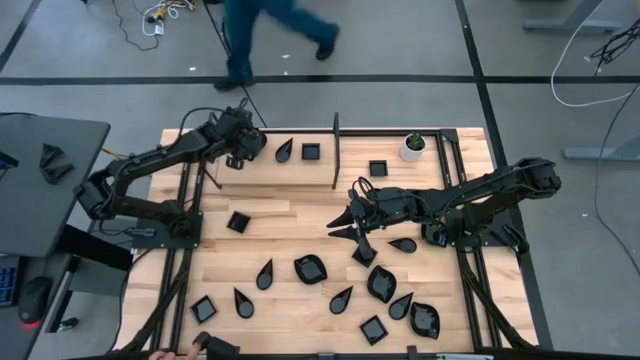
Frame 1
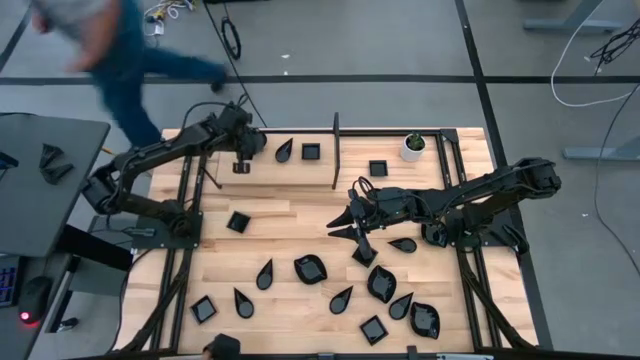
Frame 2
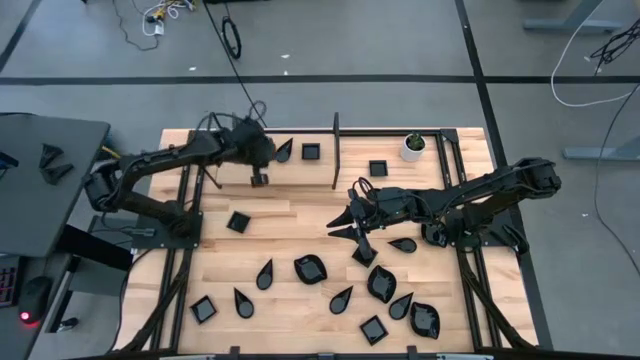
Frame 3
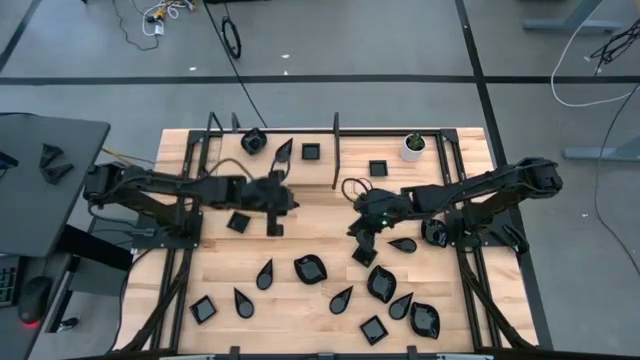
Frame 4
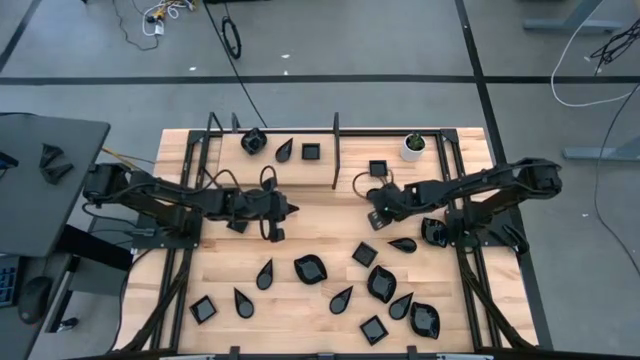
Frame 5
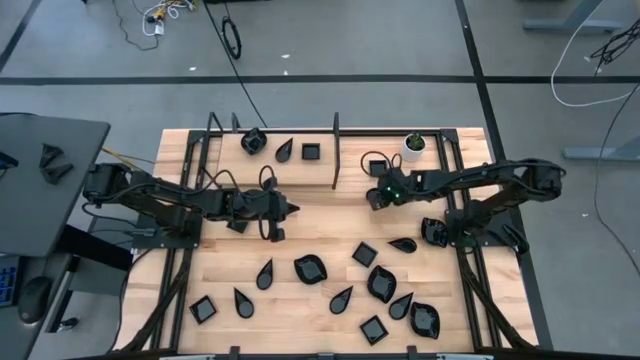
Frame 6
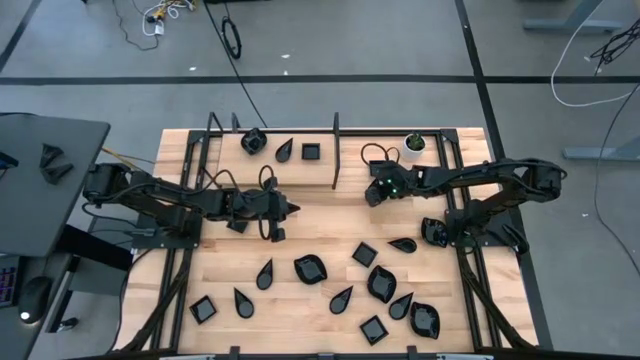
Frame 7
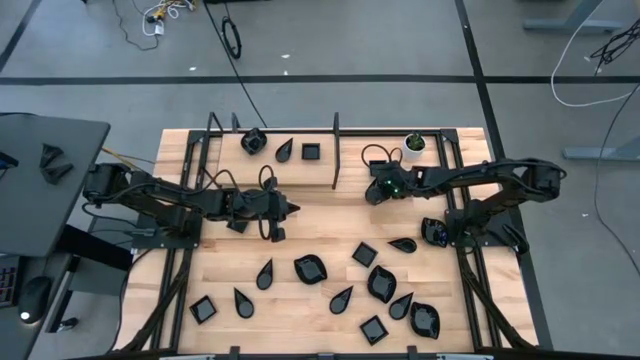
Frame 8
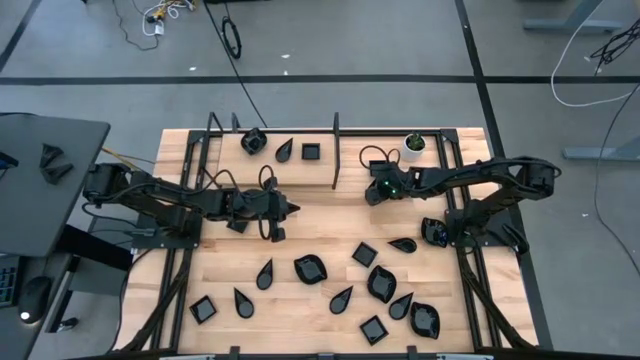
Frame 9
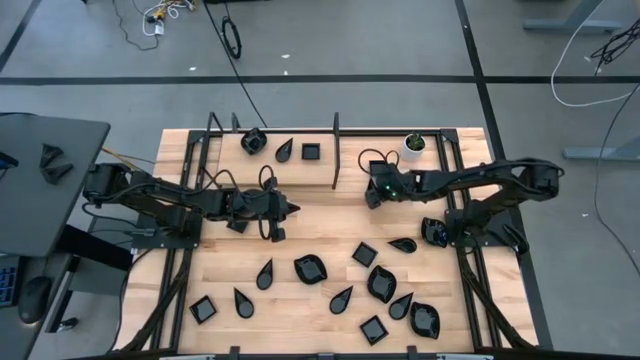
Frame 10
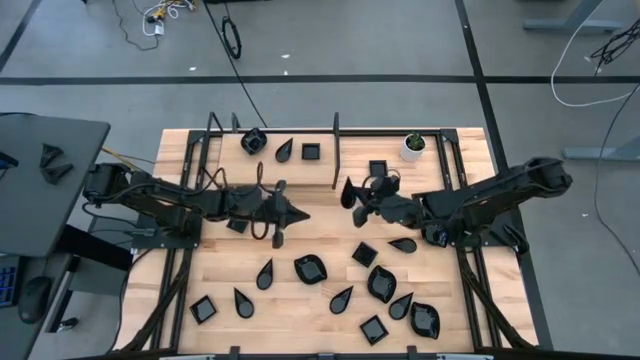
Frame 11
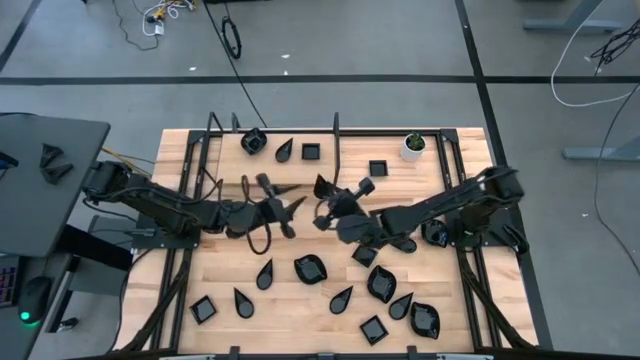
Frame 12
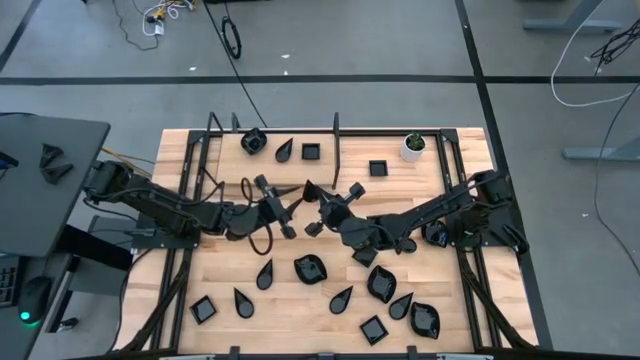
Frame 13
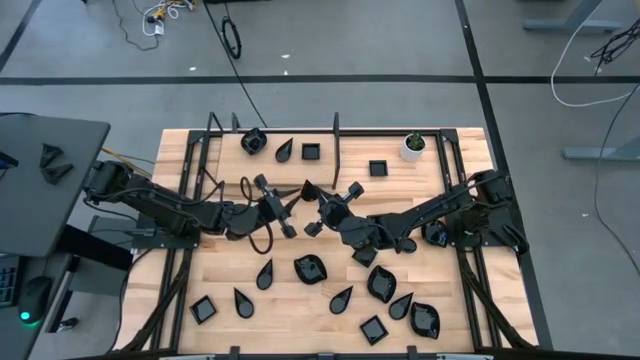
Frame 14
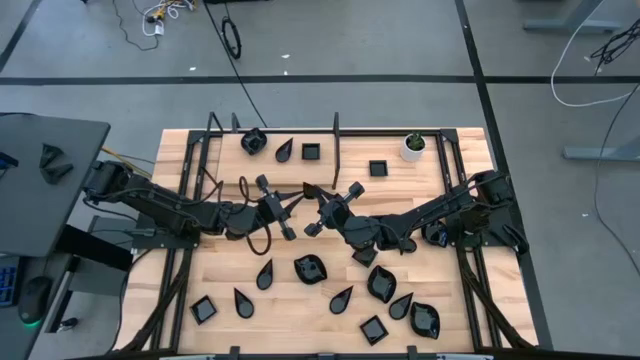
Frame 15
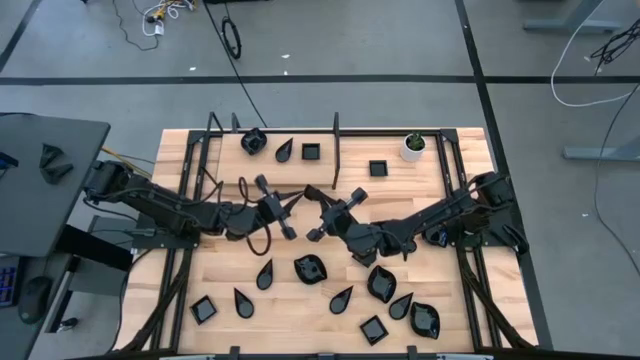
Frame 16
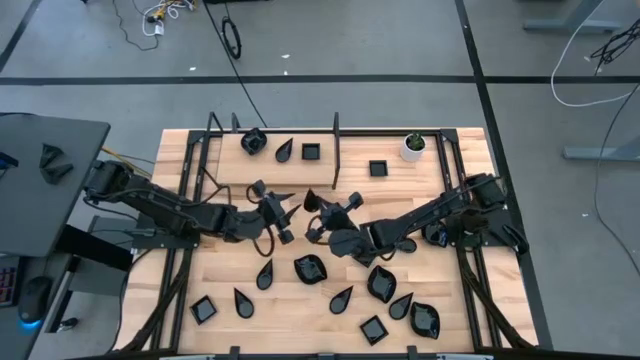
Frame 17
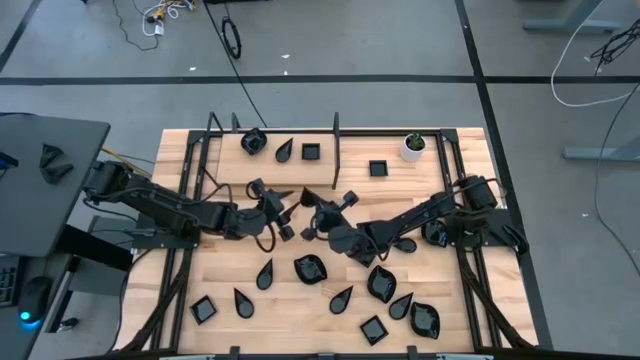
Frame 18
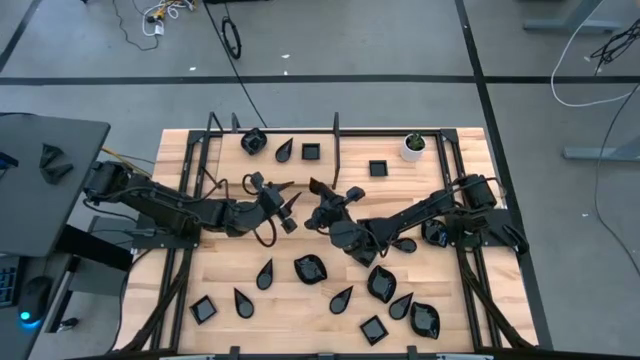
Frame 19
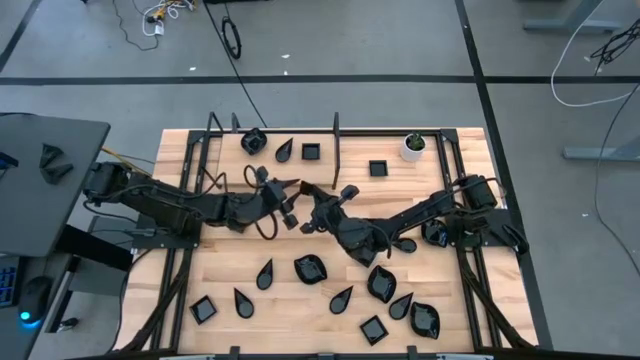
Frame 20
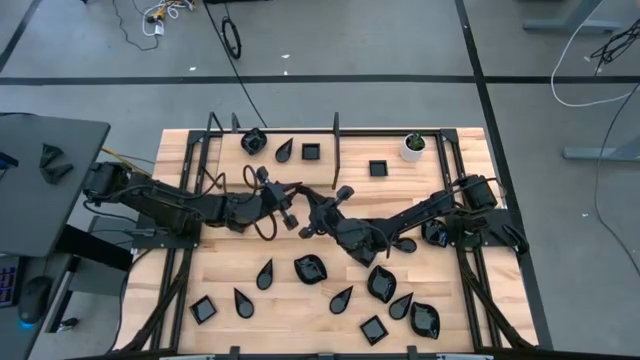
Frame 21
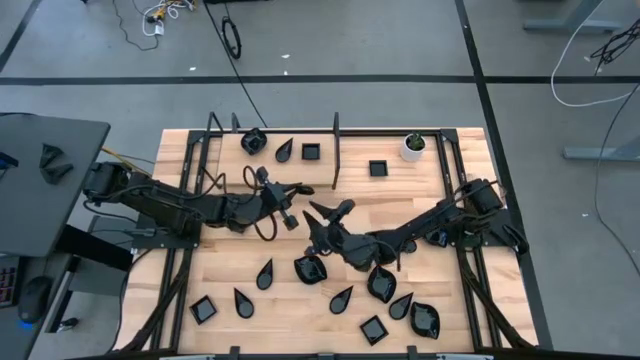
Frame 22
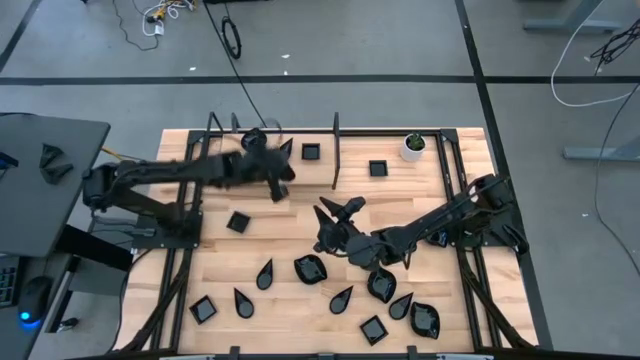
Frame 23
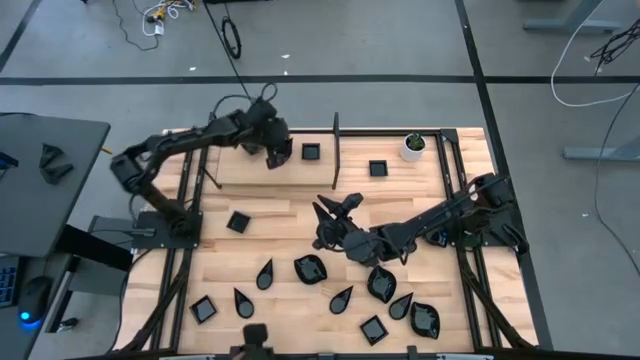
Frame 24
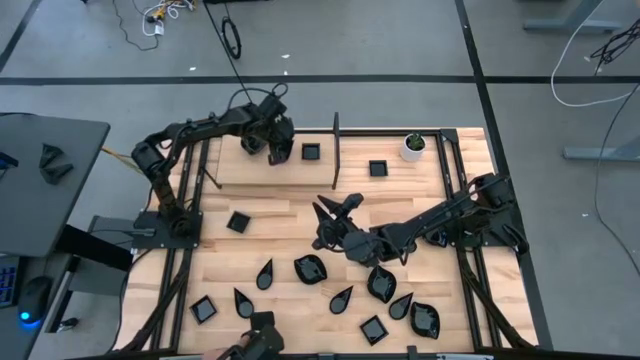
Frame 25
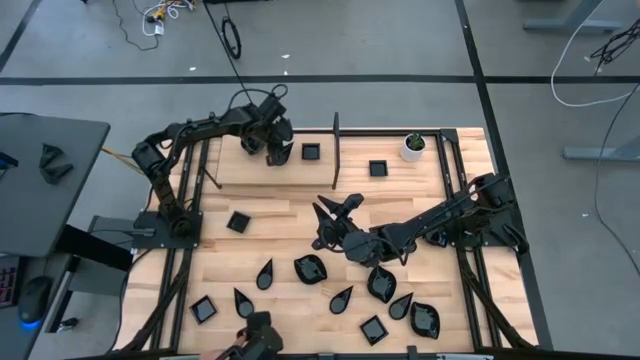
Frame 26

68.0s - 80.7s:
Task: Pick & Place Mini shaped plates
Stack the black leaf-shaped plate on top of the stacked black leaf-shaped plates on the shelf

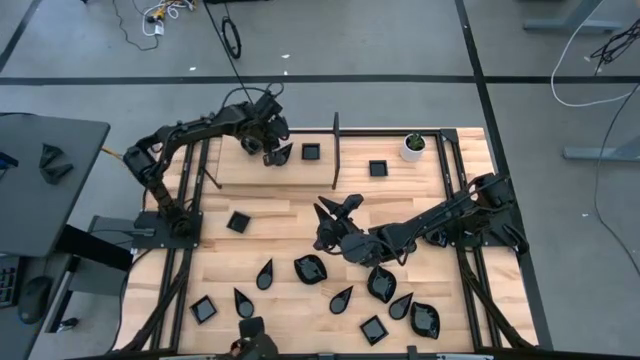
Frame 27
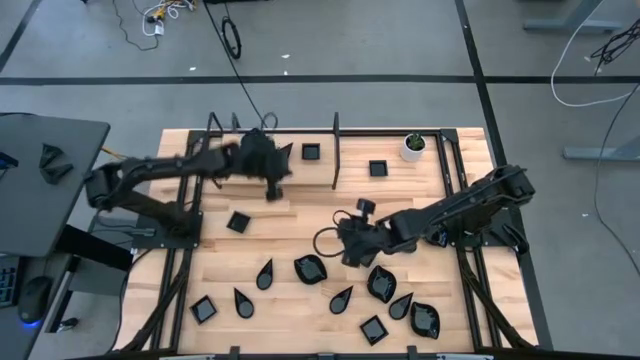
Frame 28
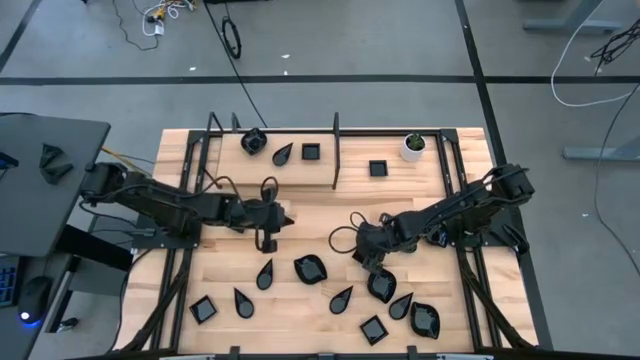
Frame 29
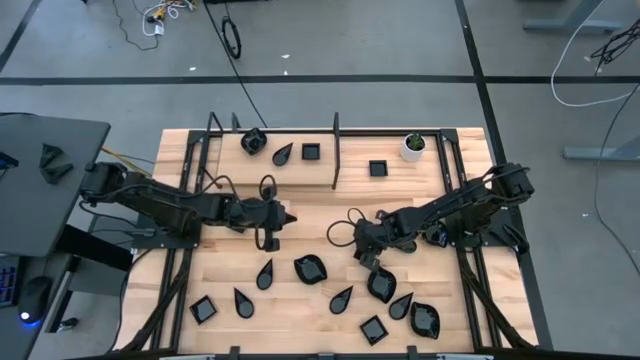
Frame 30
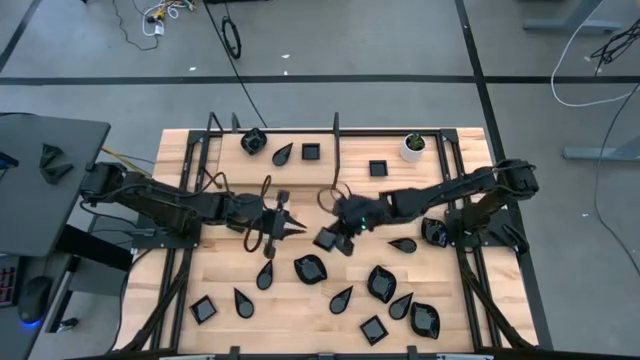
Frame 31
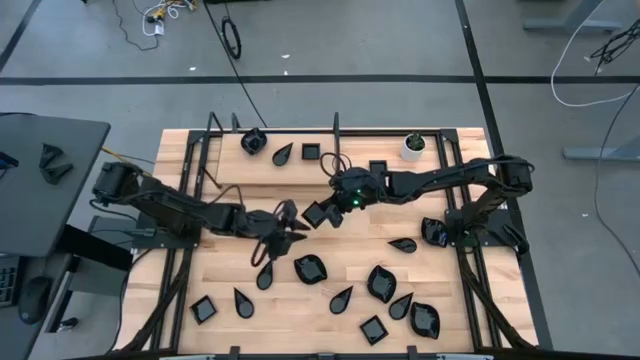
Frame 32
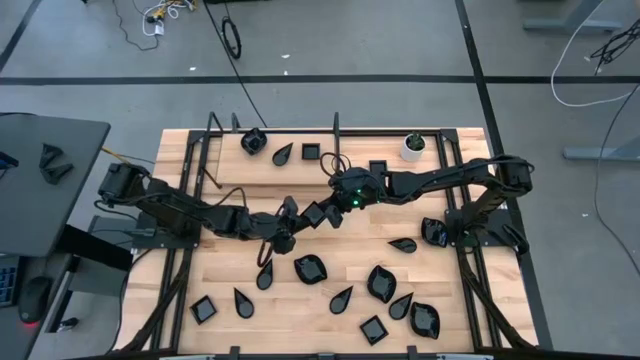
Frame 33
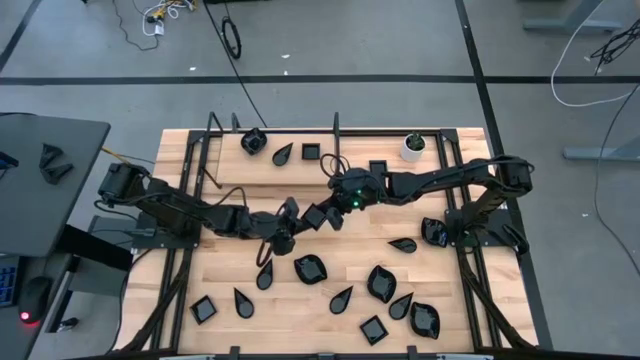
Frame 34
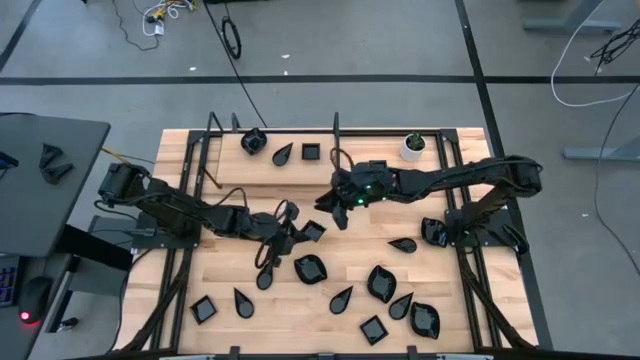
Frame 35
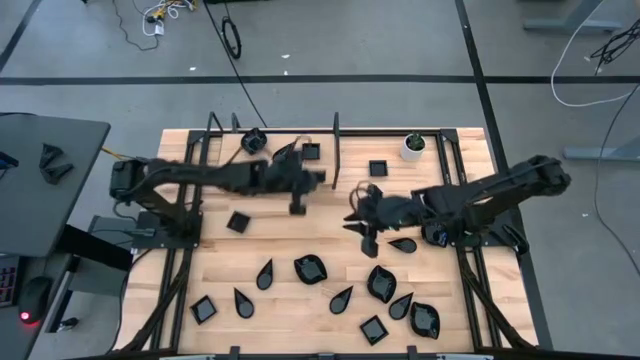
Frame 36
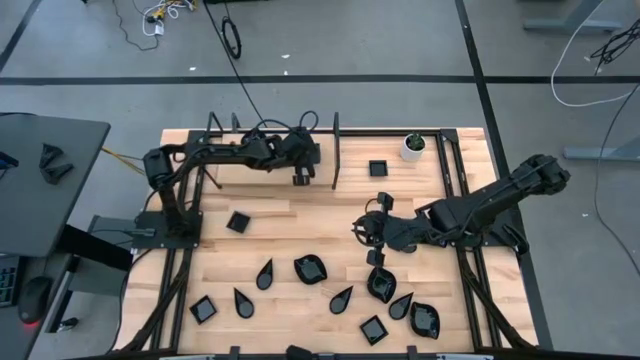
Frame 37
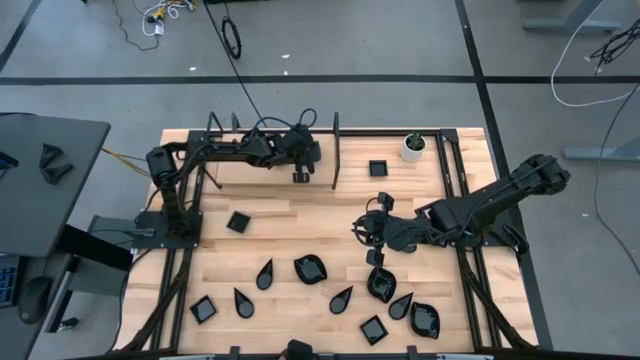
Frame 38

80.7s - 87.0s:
Stack the black square plate on top of the stacked black square plates on the shelf

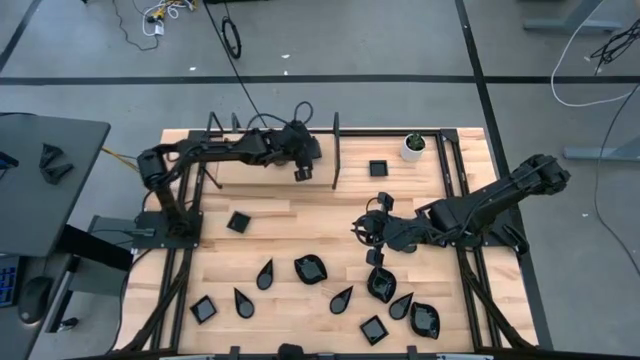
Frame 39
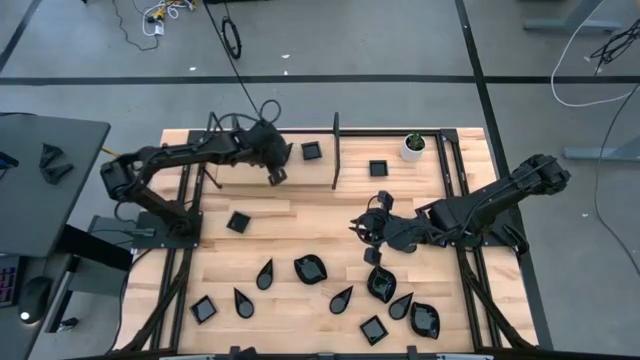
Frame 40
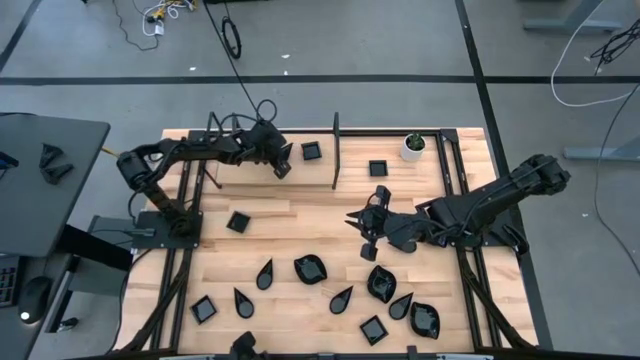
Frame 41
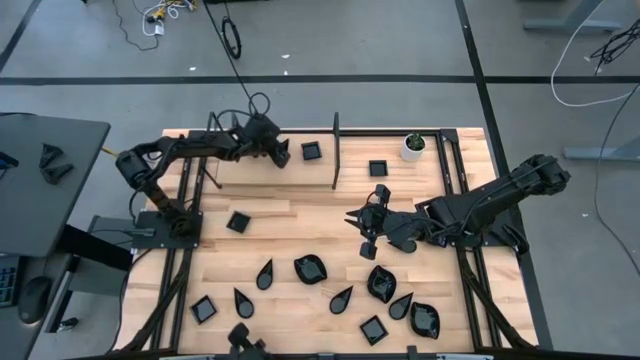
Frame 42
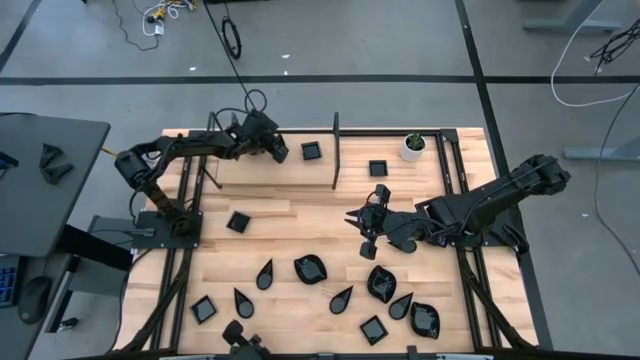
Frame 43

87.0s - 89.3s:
Adjust the black drop-shaped plates on the shelf
